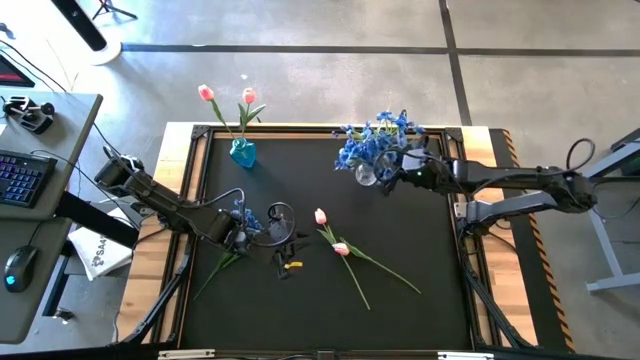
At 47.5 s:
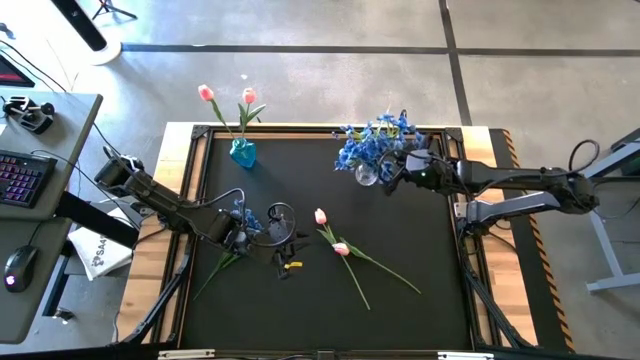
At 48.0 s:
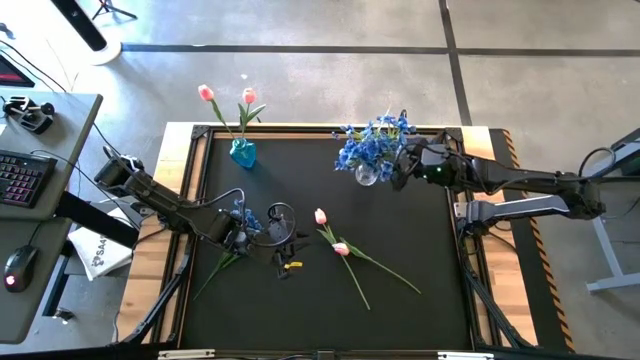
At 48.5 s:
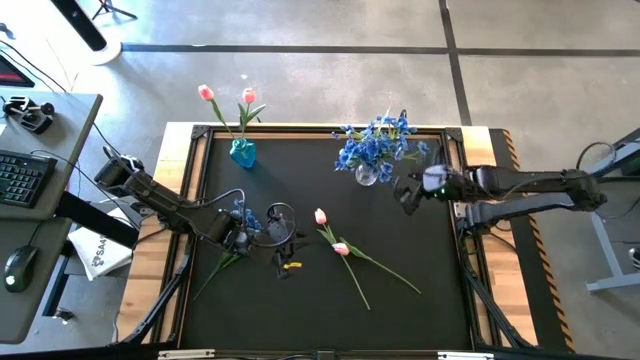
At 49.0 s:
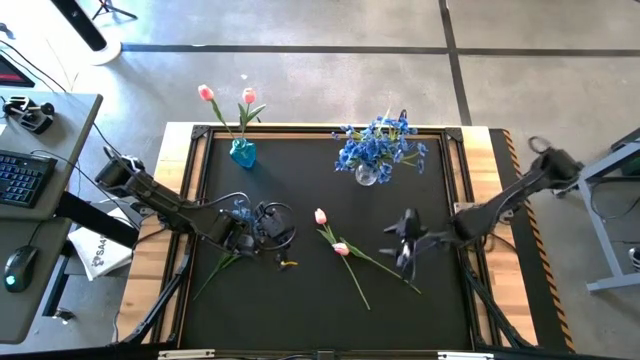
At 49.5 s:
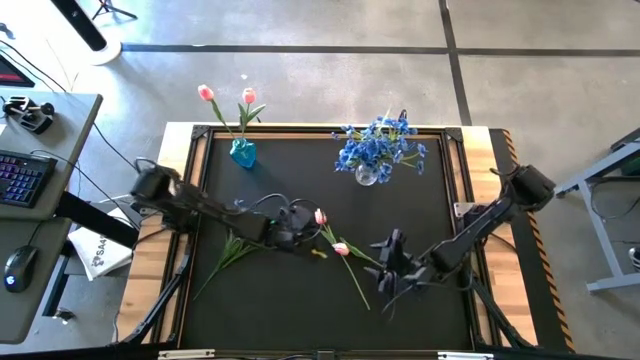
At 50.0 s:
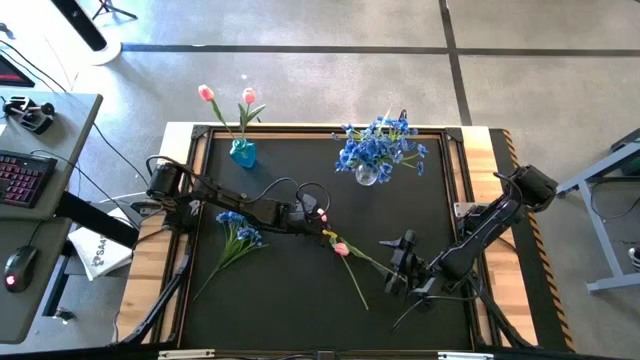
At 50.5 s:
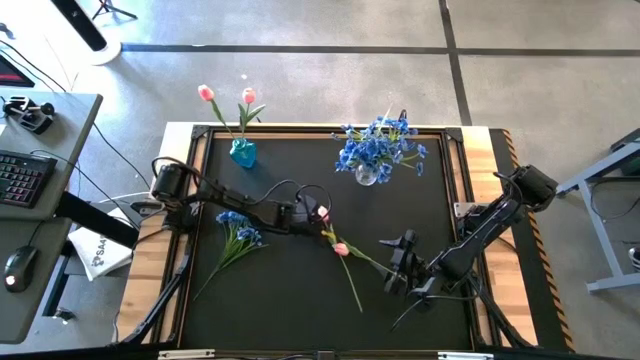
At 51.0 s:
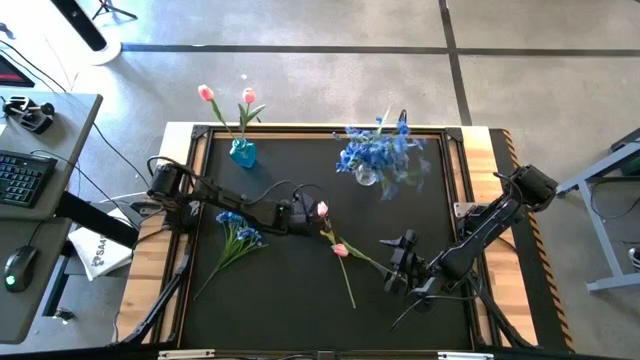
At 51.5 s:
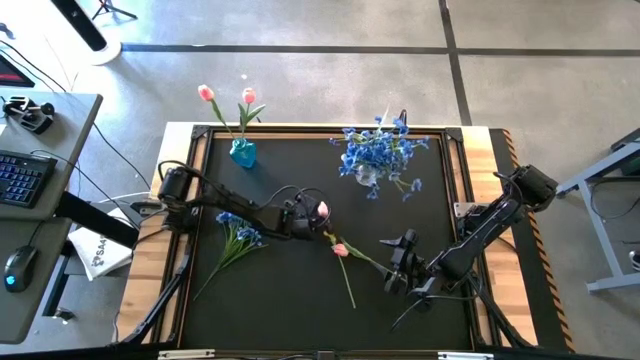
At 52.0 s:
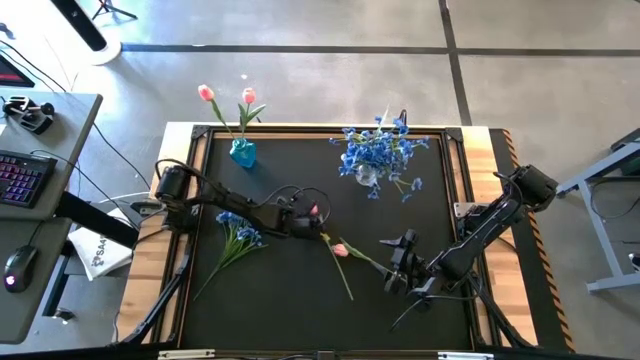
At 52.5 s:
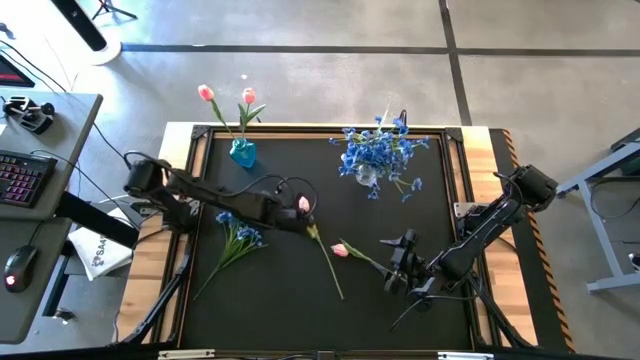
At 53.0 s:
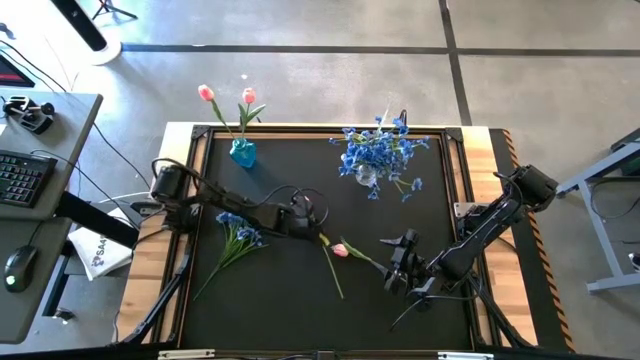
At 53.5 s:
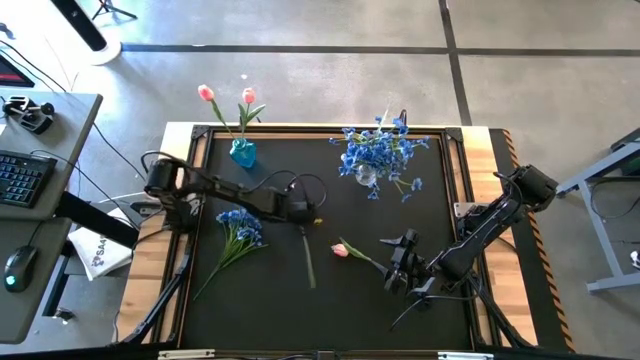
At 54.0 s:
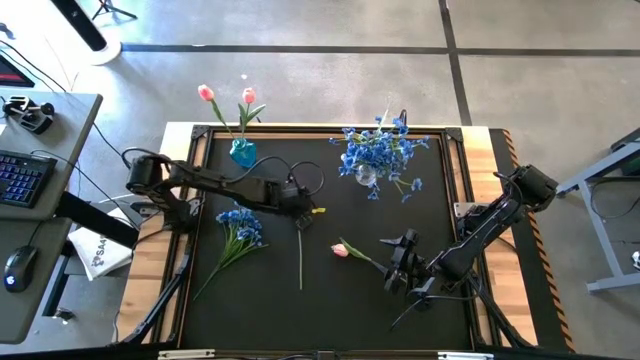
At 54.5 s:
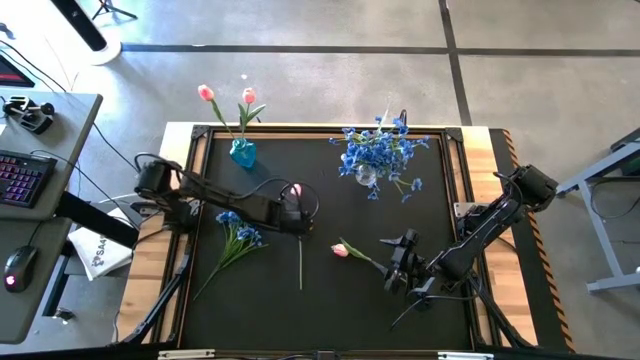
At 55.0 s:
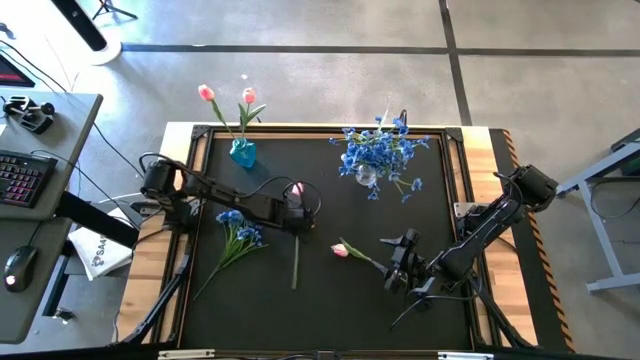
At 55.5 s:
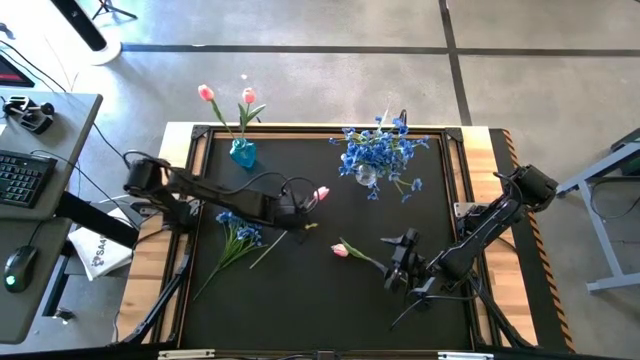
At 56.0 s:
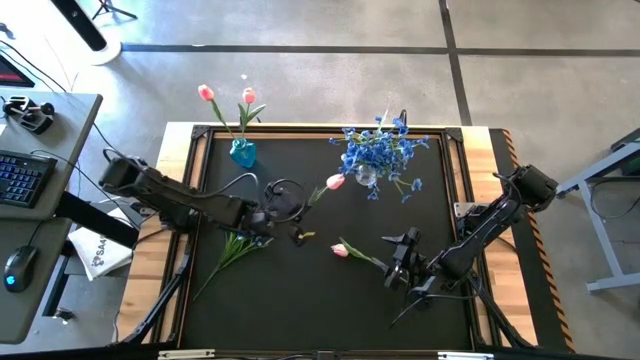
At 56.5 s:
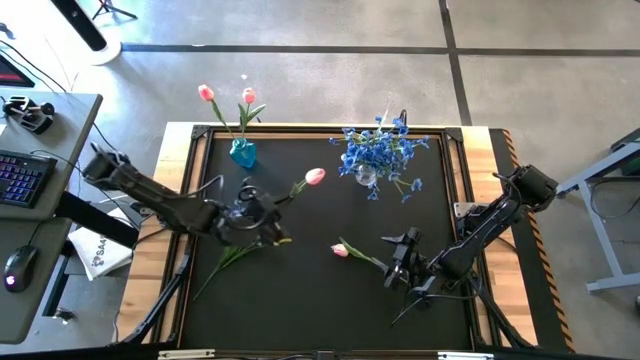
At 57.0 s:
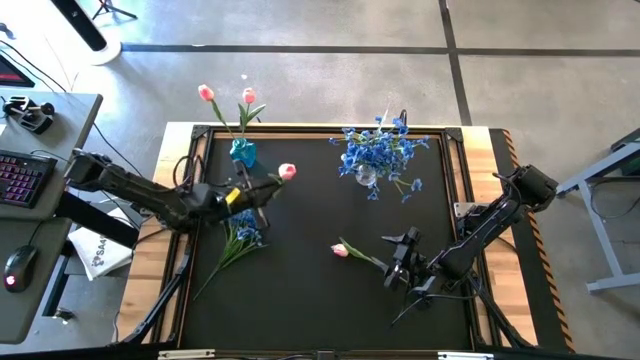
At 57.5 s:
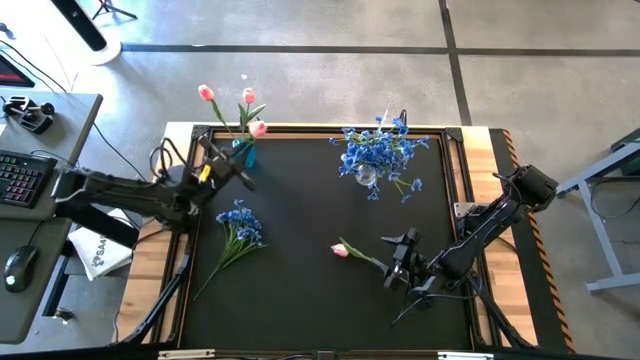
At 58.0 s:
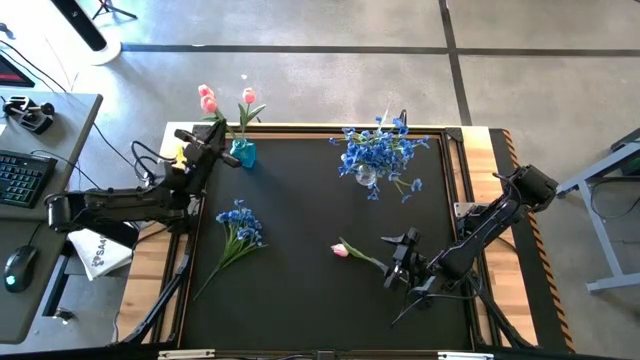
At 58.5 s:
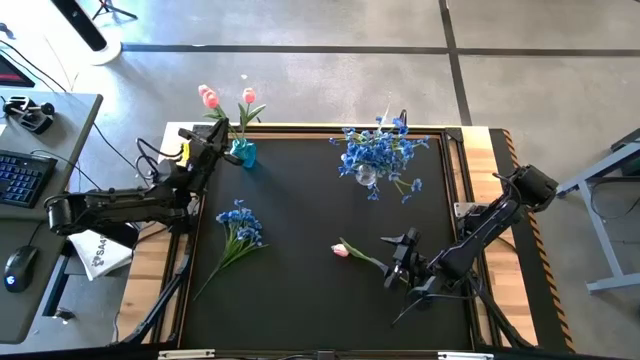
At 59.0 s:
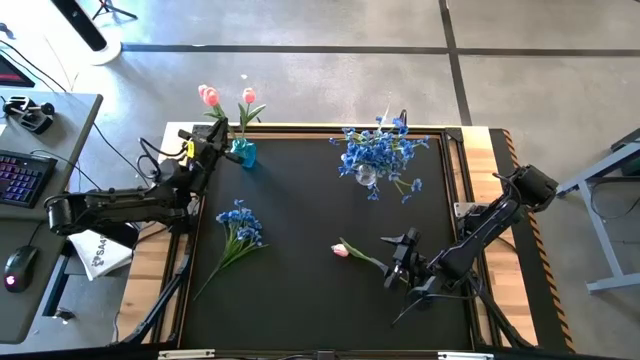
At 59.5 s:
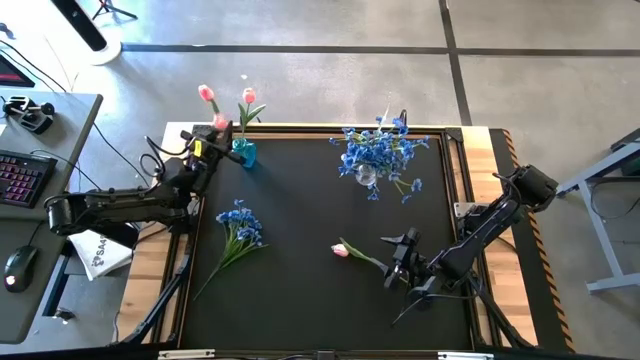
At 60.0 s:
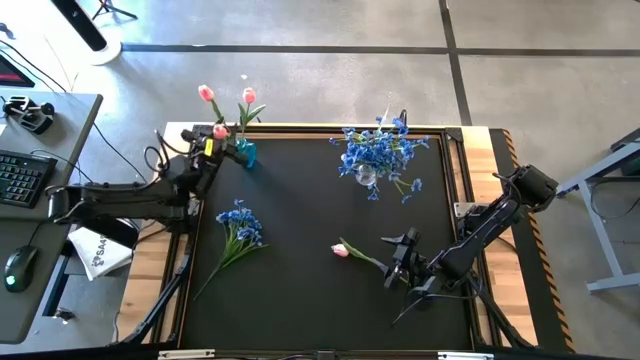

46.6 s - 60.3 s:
Task: Sort flowers into vase by color
Put the left pink flower into the blue vase

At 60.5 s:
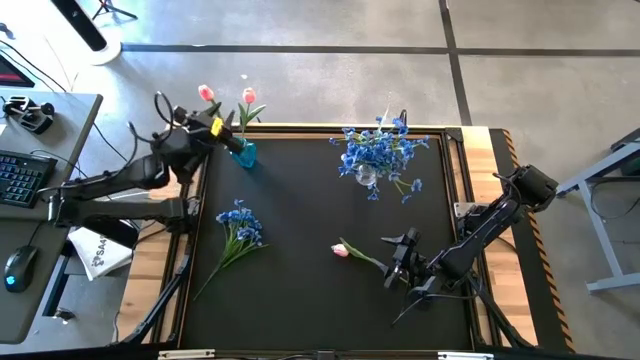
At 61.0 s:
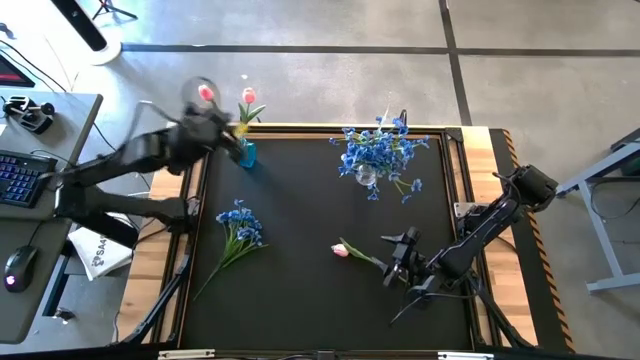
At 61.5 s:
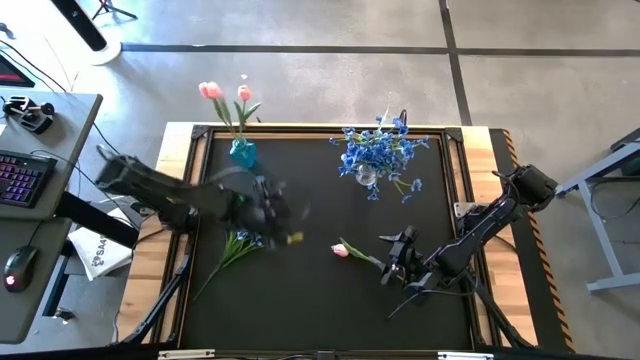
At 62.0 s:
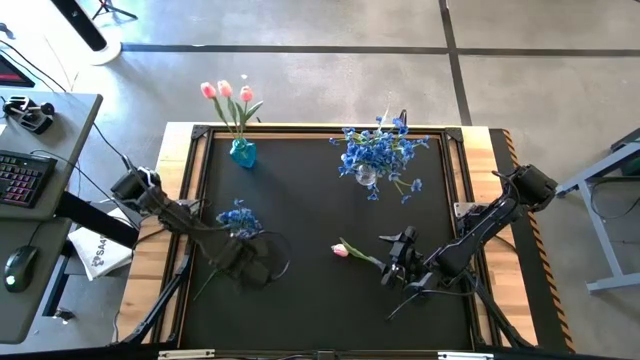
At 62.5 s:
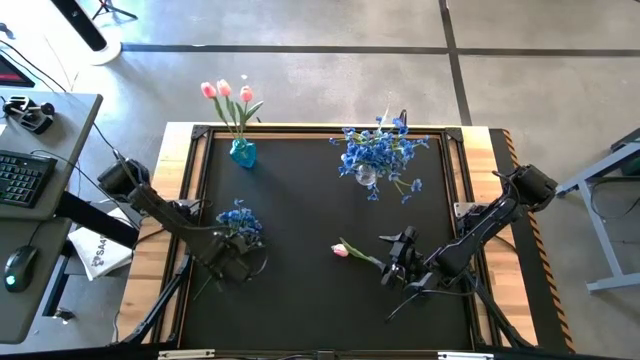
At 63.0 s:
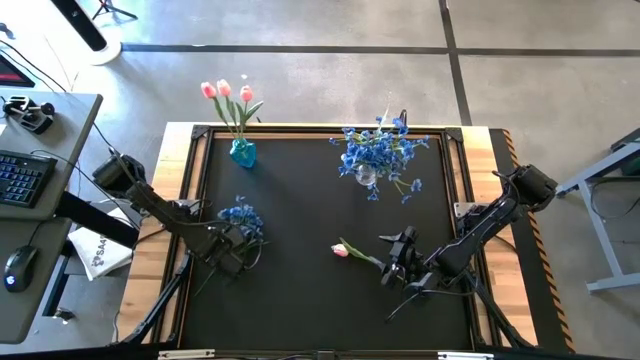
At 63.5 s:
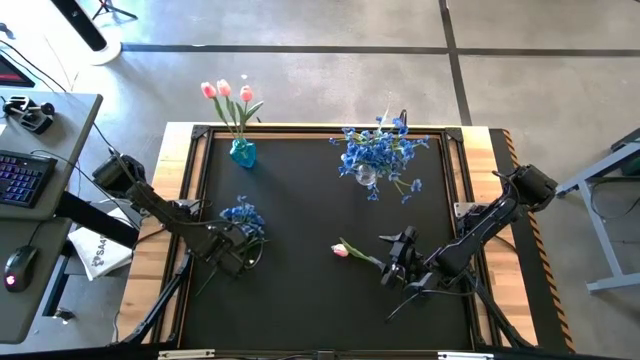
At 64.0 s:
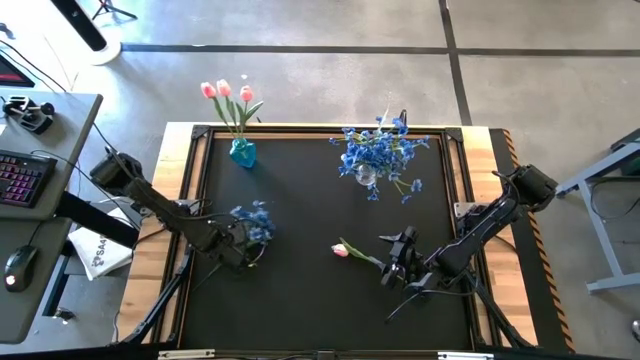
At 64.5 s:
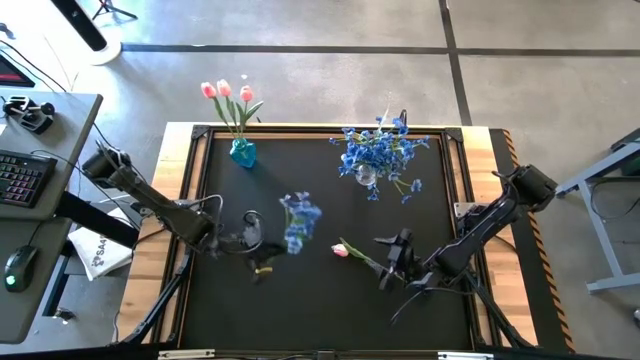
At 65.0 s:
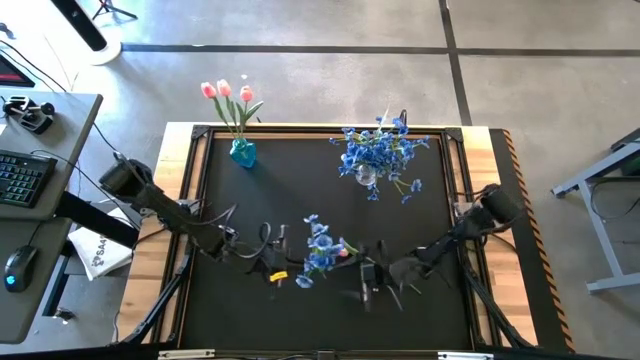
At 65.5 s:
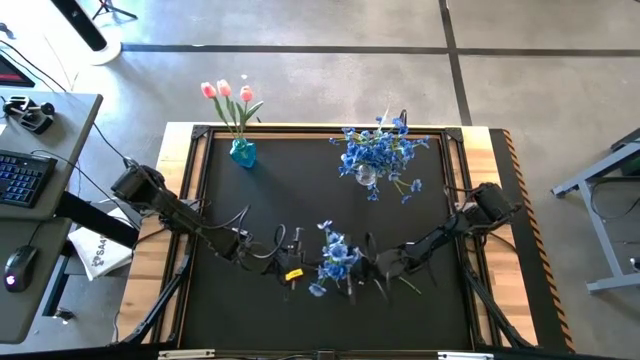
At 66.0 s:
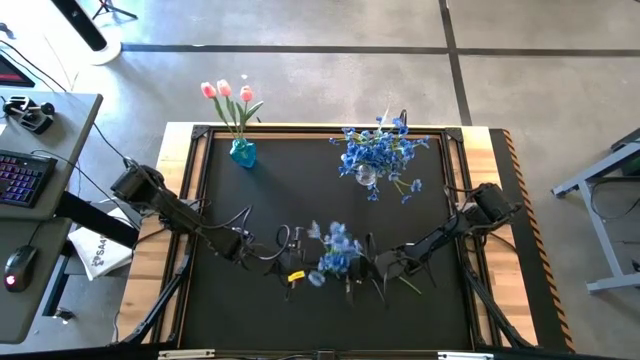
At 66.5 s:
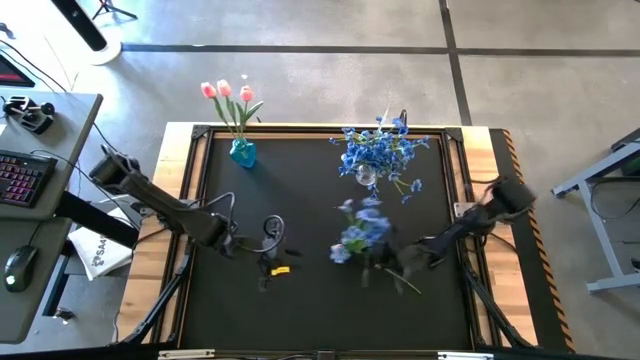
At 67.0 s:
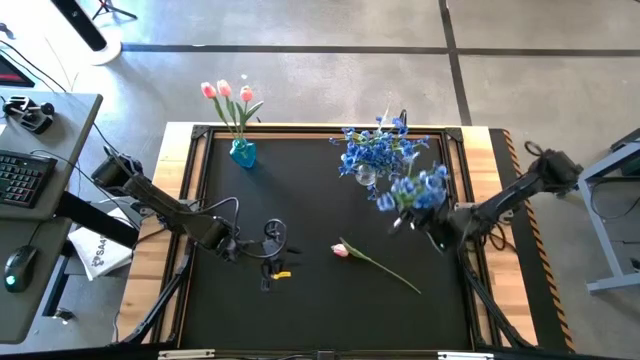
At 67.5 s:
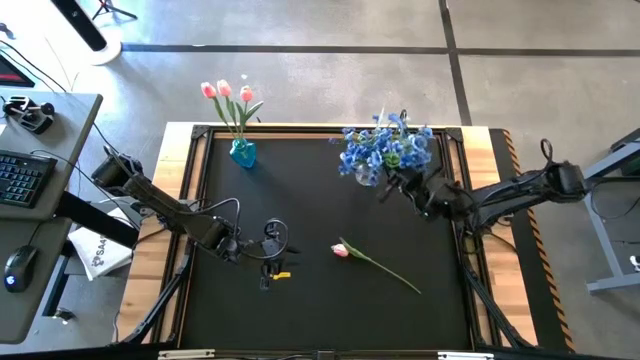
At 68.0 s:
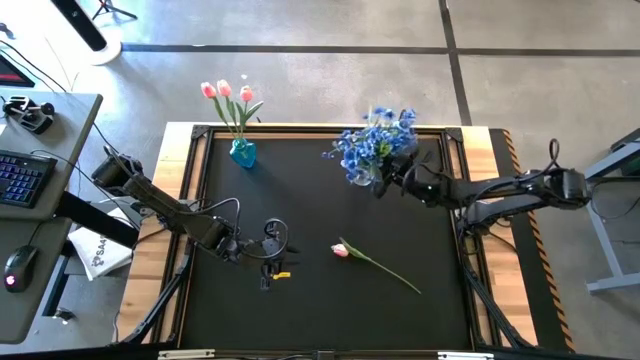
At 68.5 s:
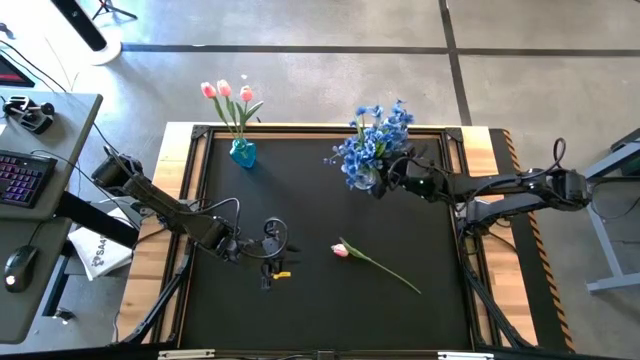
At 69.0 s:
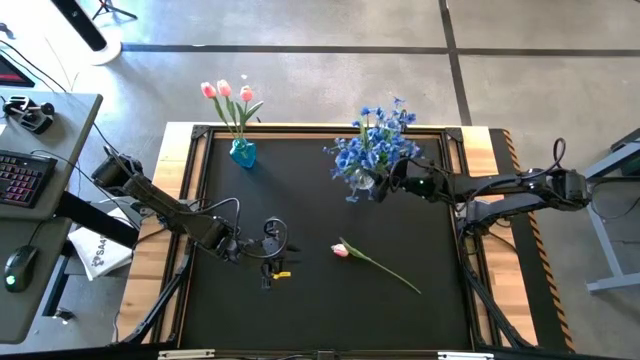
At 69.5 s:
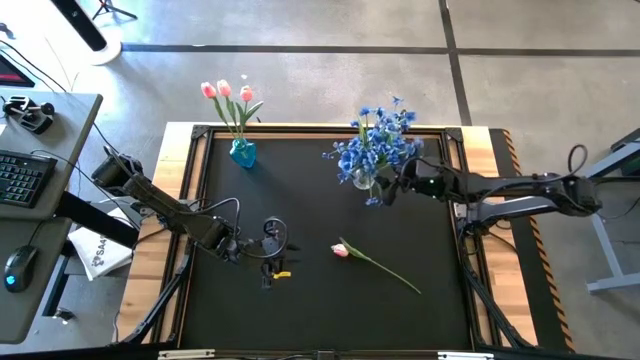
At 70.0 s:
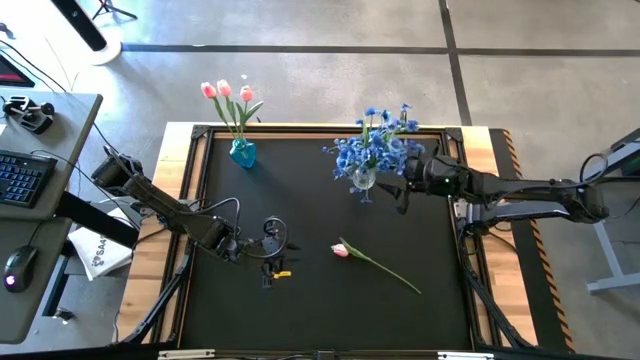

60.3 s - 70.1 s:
Put the blue flower into the transparent vase
